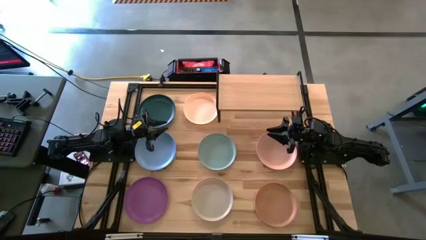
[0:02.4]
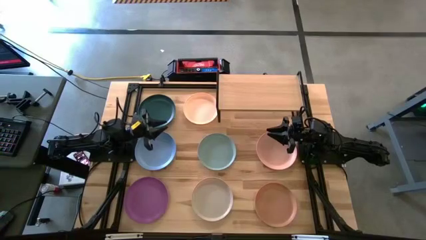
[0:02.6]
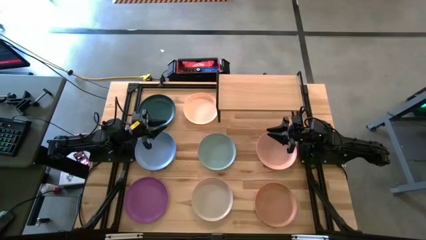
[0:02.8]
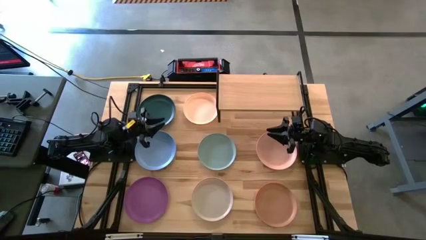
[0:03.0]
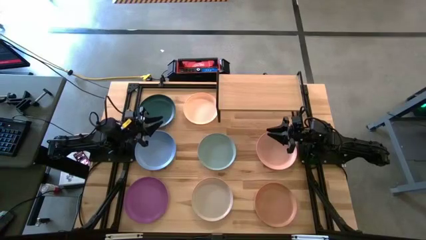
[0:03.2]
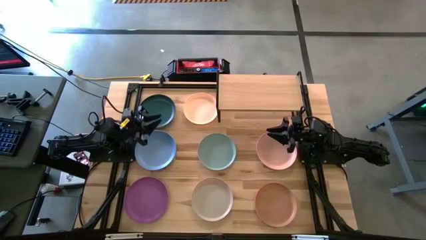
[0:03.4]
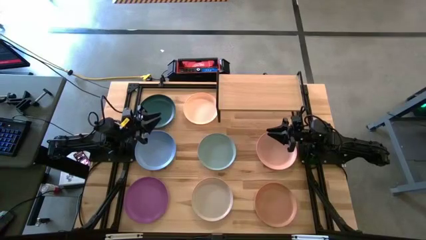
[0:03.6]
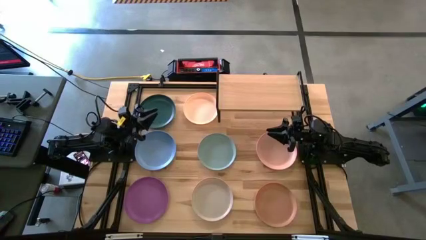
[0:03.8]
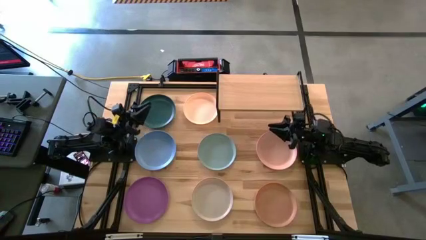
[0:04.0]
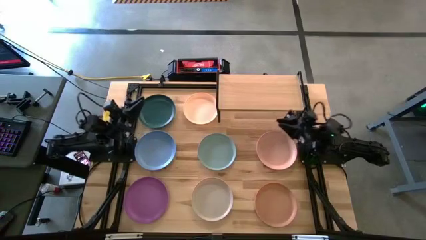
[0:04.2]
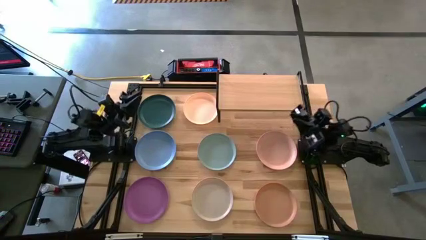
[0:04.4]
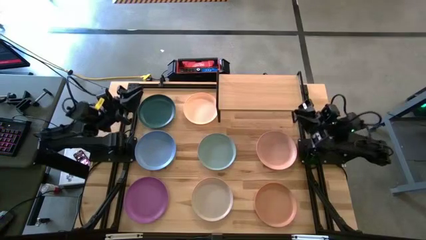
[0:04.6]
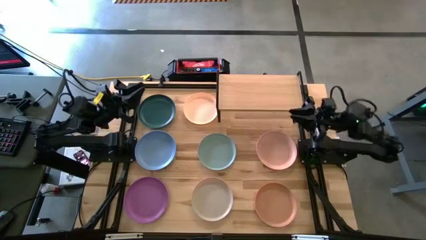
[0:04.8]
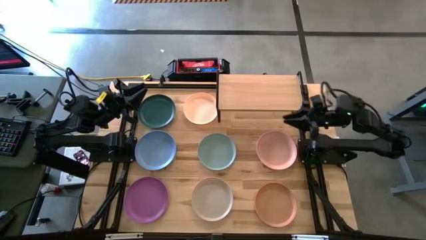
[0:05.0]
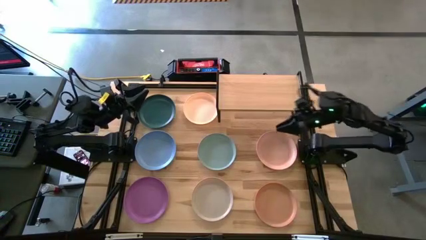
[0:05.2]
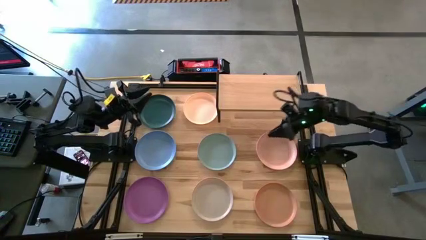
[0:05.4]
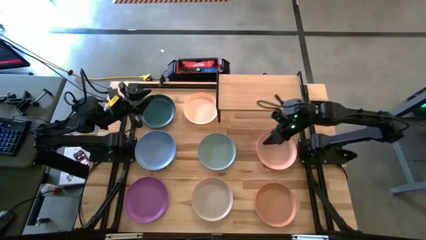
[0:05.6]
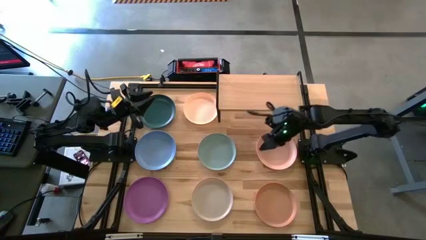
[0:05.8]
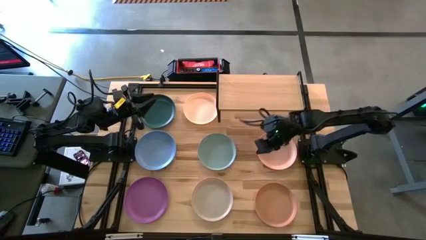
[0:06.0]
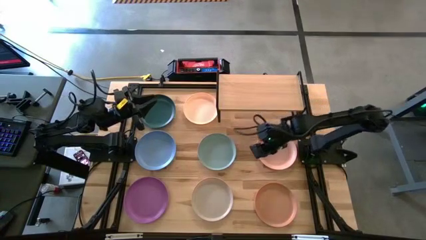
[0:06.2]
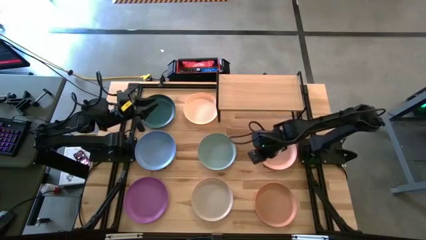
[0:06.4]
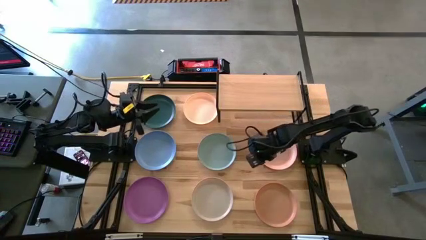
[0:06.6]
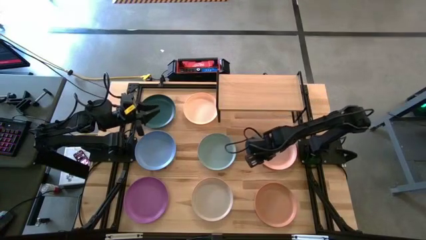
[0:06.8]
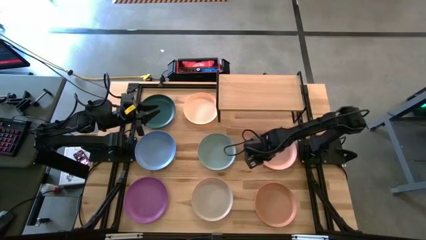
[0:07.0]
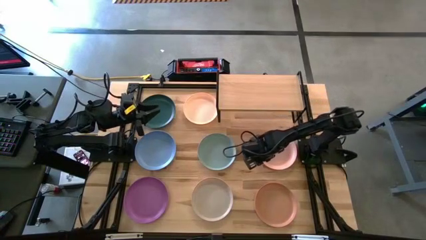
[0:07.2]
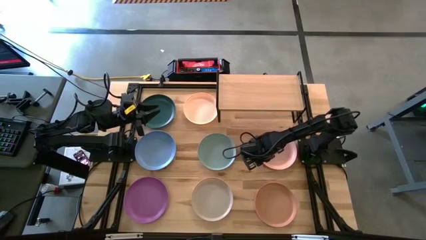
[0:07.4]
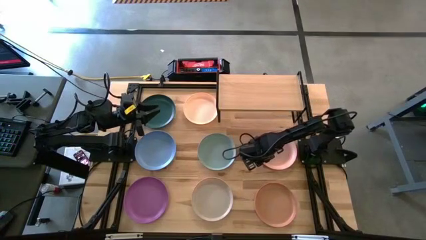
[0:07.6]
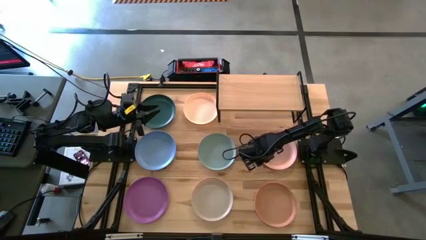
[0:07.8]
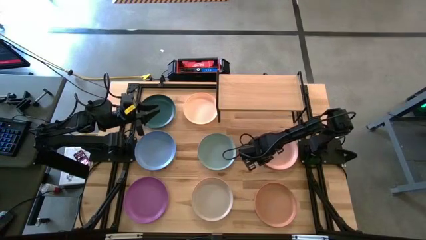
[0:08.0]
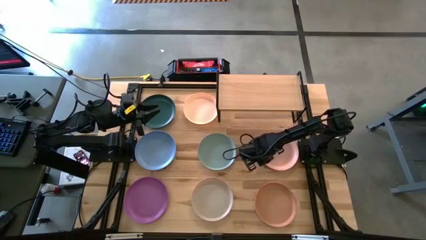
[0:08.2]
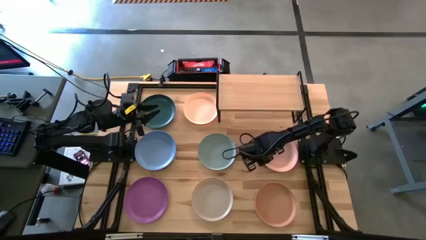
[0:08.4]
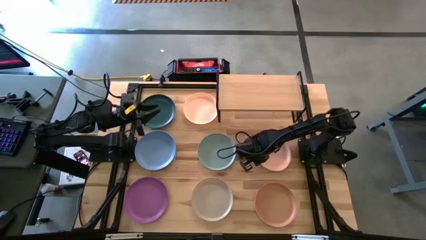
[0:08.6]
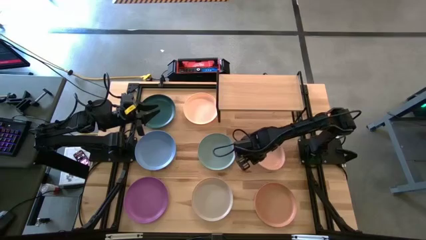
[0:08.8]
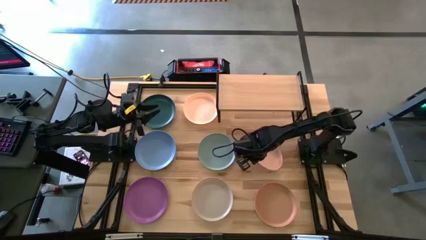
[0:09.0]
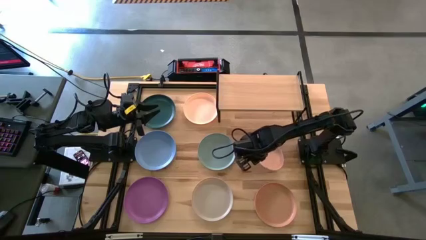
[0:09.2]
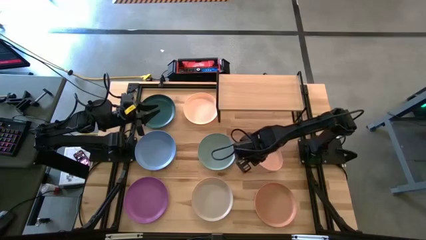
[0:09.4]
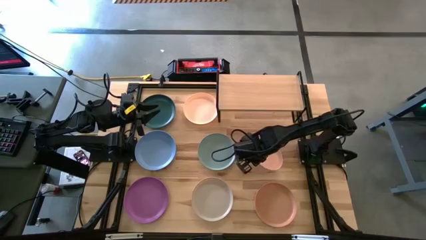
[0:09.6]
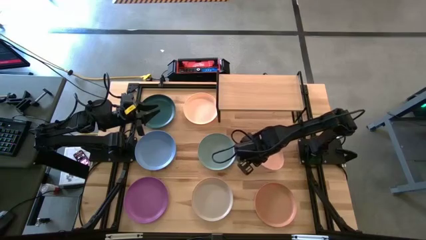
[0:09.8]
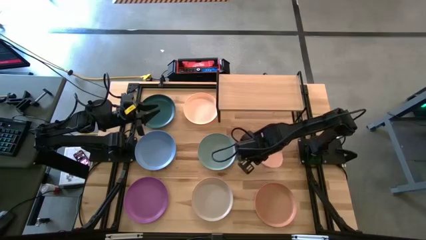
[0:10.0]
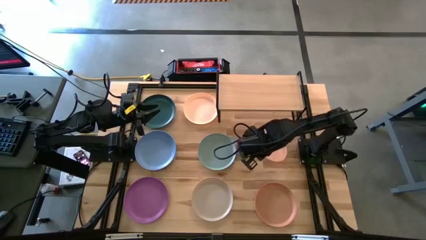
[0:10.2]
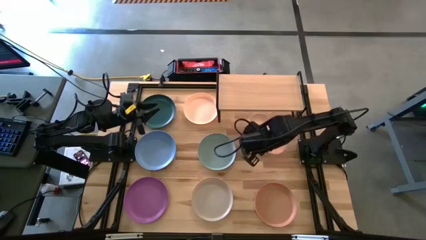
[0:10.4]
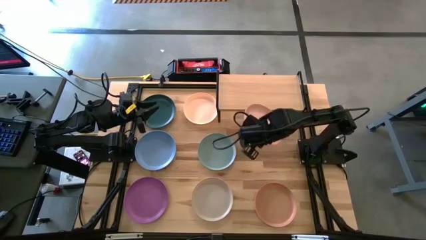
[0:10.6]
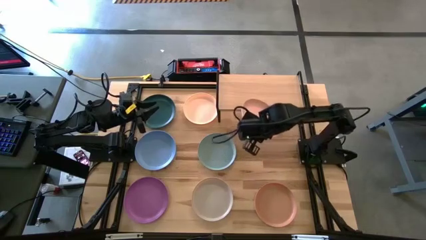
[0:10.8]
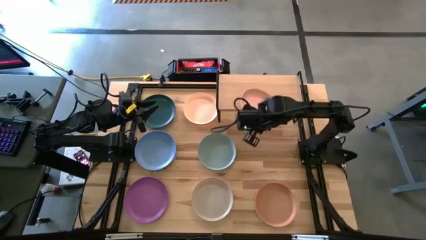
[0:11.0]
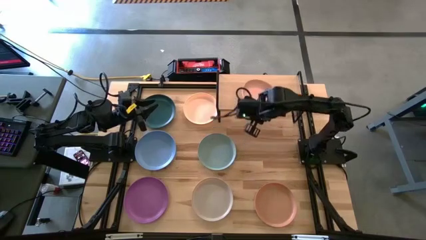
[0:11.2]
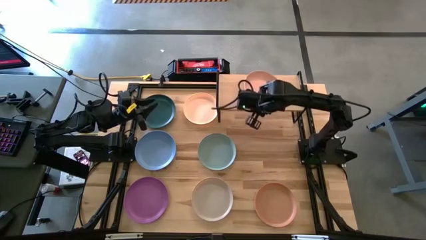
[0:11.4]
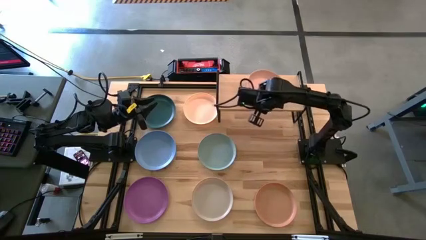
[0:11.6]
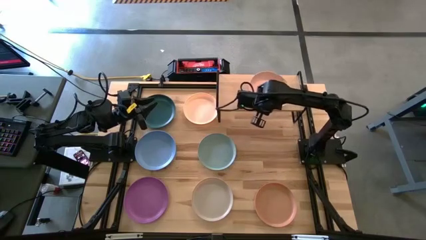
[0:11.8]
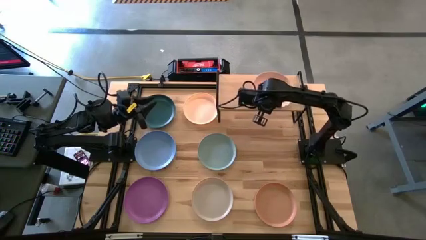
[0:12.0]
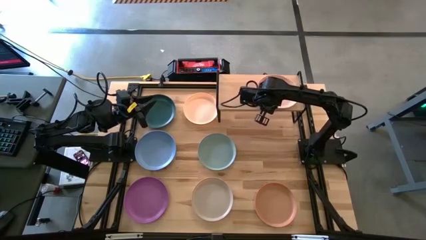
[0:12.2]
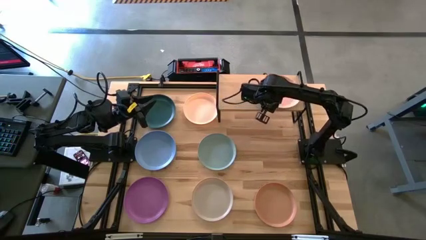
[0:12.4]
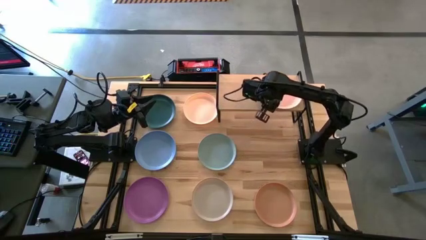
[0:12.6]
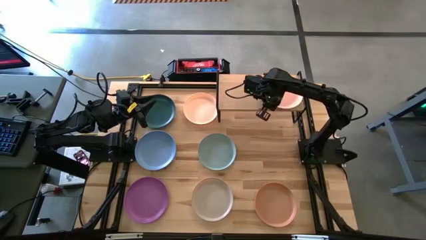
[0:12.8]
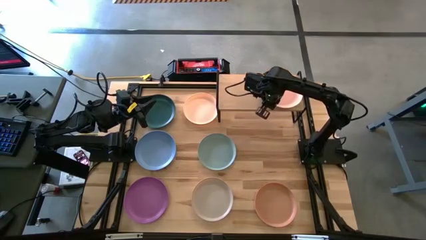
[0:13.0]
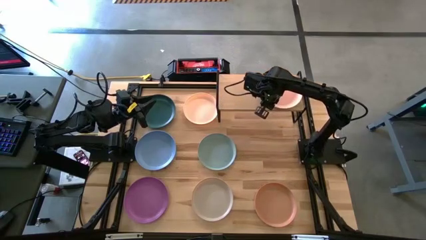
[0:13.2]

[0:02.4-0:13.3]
Task: Place and stack plates onto a shelf
Put the pink plate on the shelf

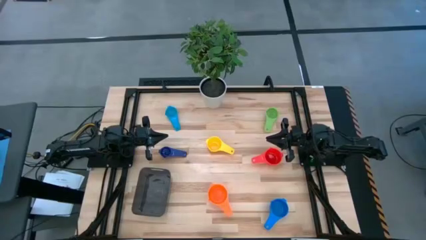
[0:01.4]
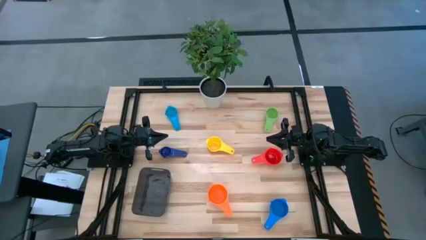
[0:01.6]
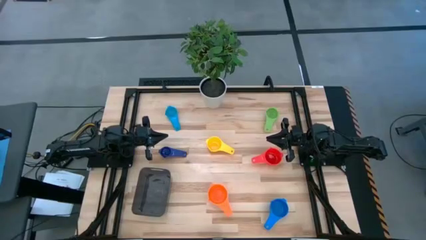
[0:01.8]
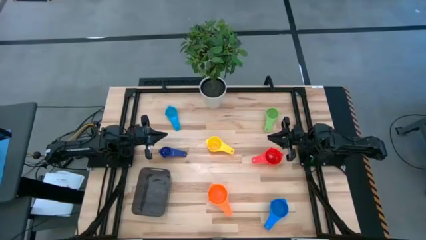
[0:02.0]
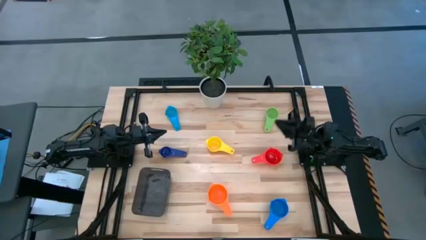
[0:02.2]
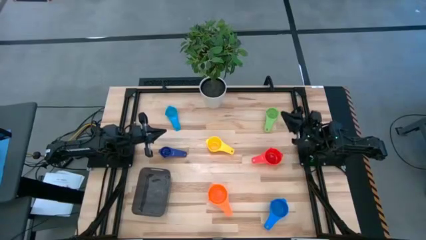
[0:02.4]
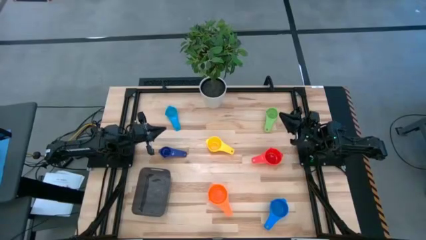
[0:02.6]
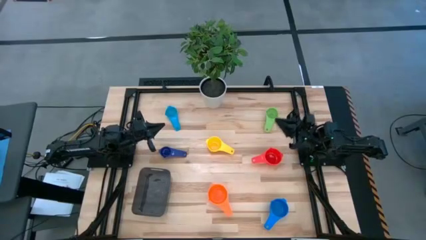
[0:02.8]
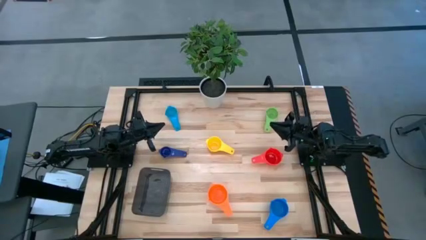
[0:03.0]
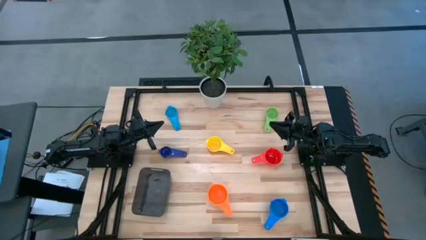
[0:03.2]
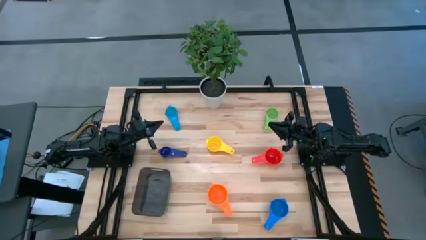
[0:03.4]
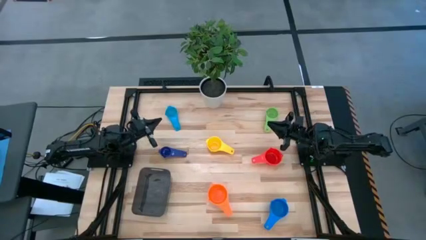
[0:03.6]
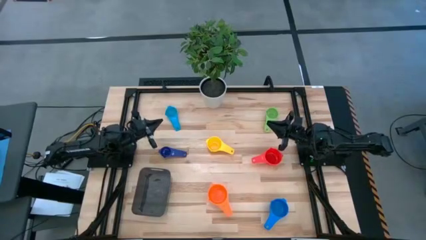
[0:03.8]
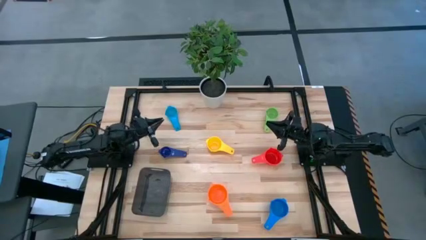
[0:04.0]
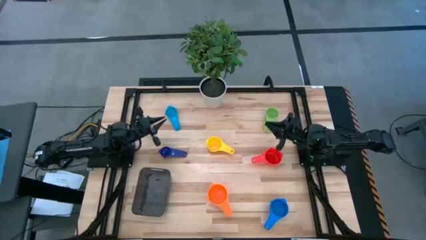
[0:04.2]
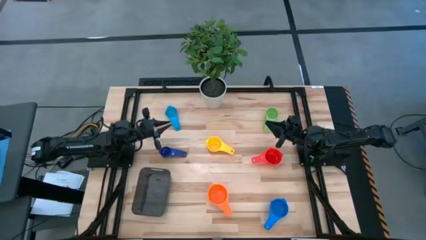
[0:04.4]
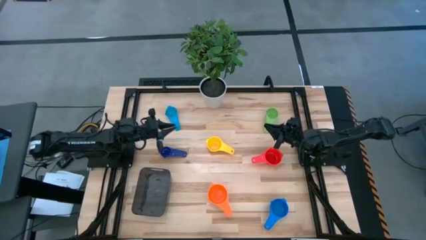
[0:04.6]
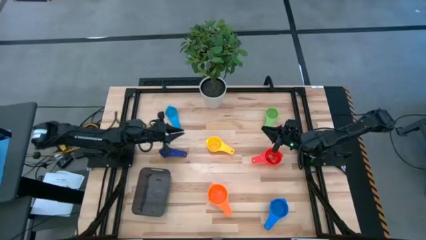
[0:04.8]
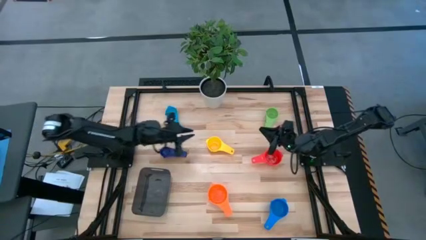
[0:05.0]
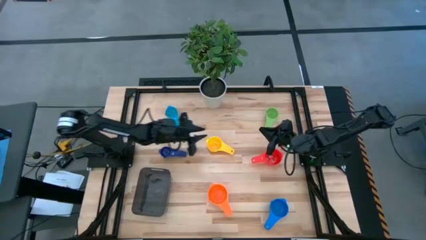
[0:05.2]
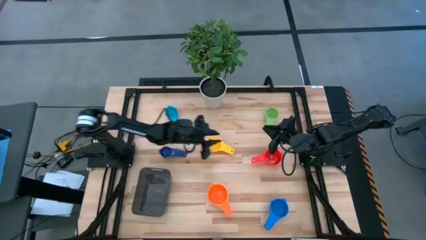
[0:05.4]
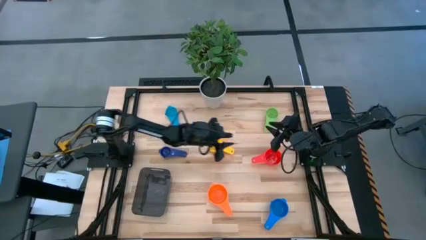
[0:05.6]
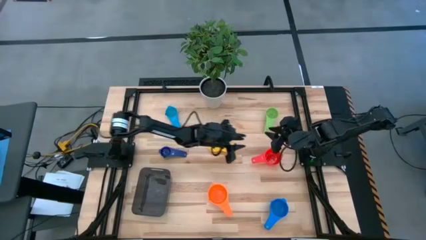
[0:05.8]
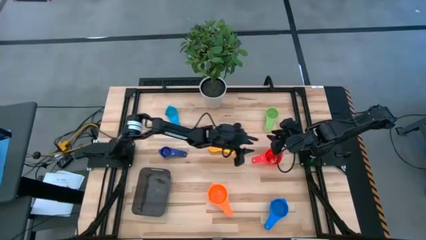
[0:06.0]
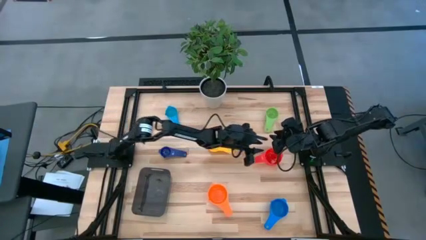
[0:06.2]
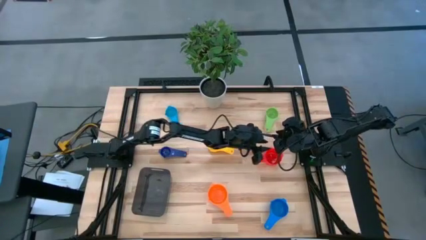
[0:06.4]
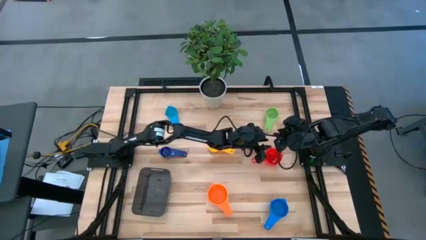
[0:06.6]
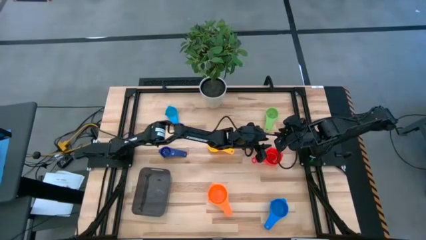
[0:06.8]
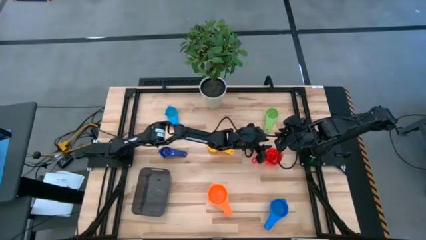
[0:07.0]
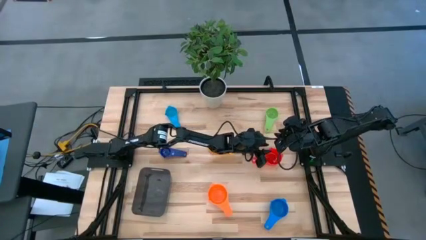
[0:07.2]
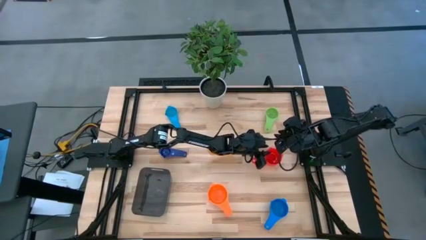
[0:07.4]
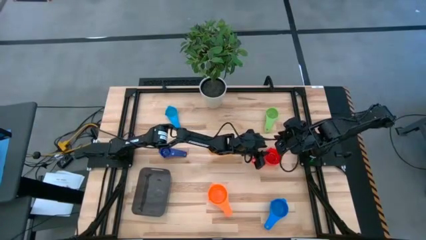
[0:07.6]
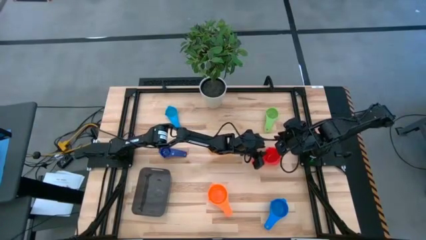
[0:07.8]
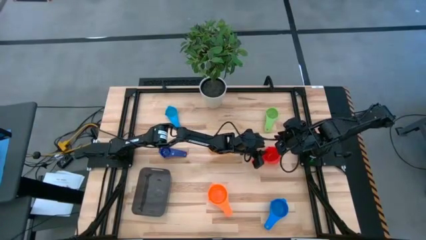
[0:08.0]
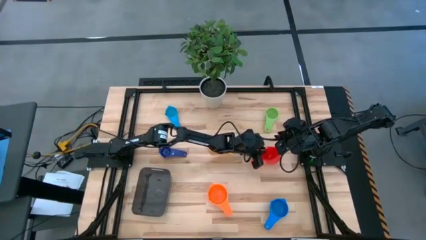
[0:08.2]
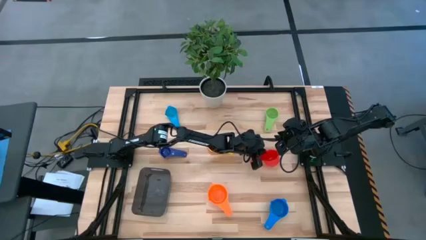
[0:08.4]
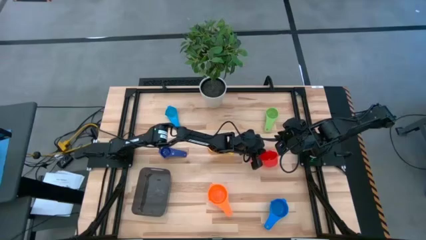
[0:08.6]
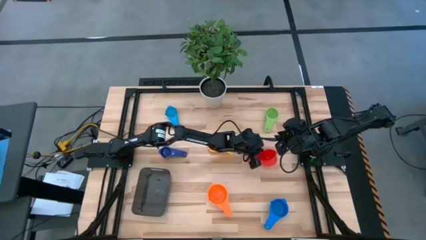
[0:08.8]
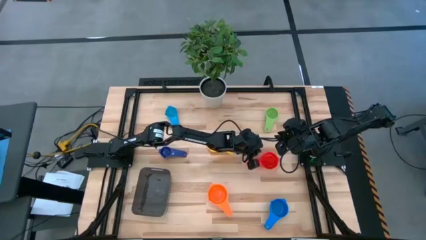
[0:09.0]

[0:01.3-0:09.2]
Task: Nest measuring cups in basket
Stack the red measuring cup on top of the orange measuring cup
